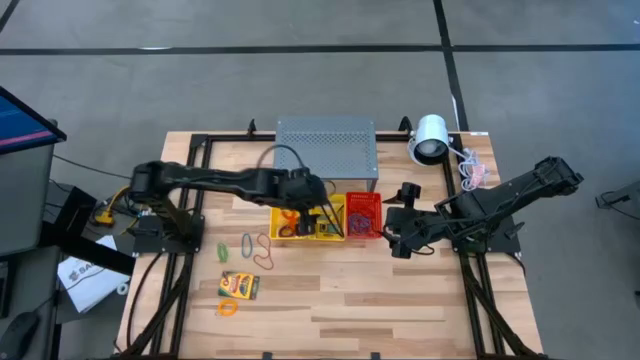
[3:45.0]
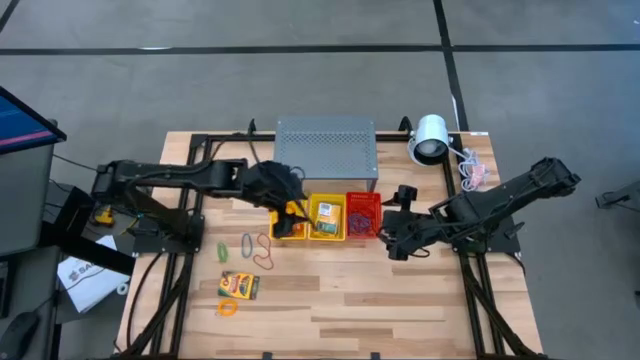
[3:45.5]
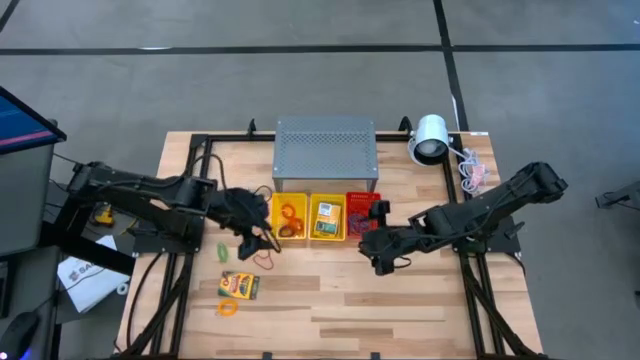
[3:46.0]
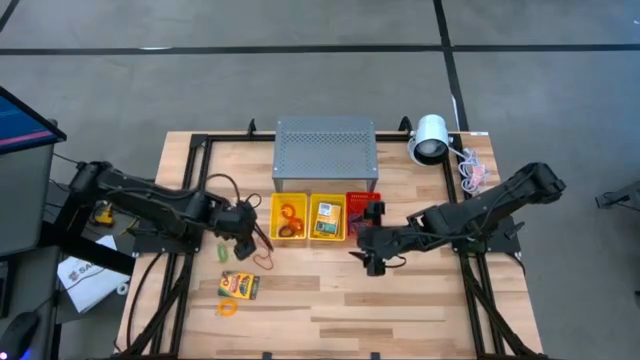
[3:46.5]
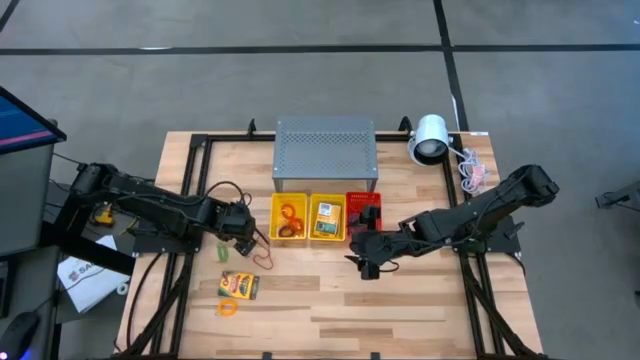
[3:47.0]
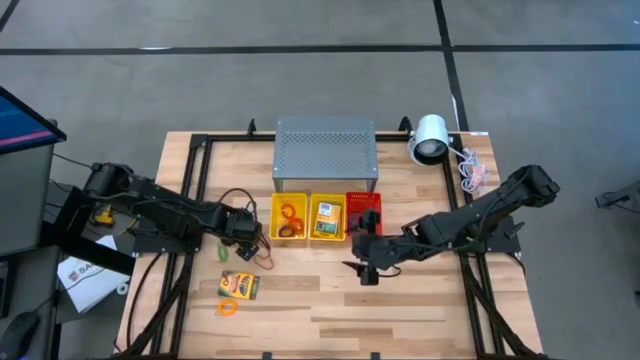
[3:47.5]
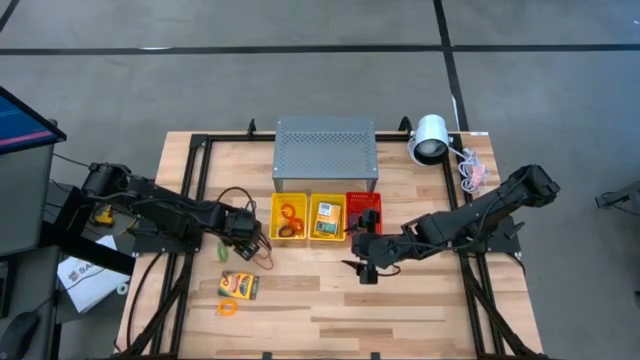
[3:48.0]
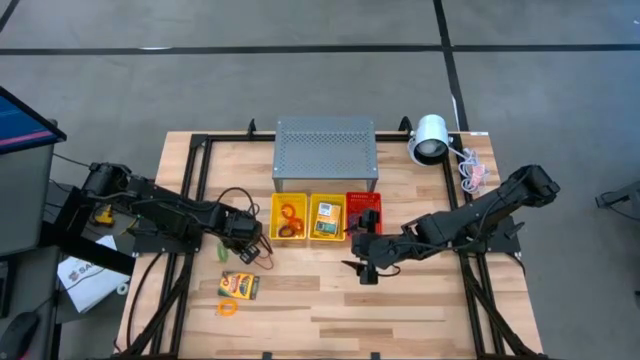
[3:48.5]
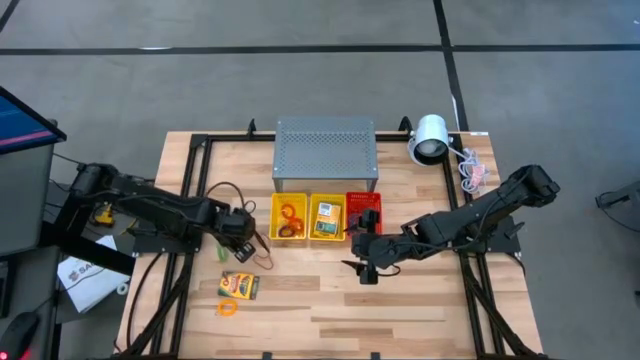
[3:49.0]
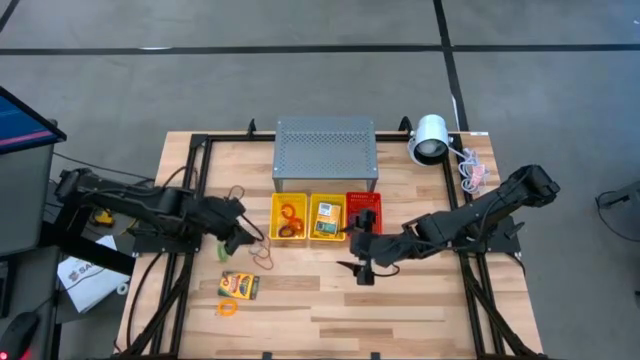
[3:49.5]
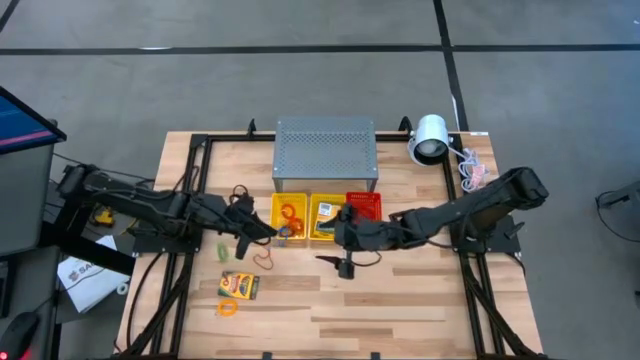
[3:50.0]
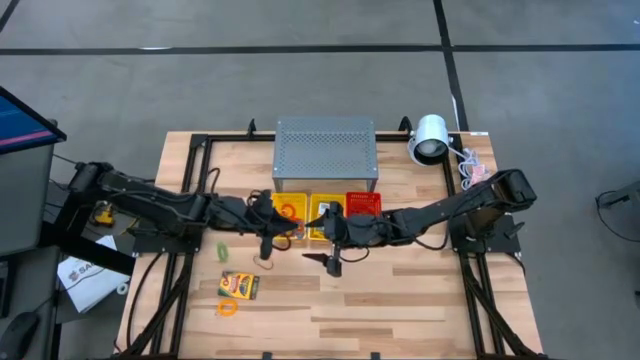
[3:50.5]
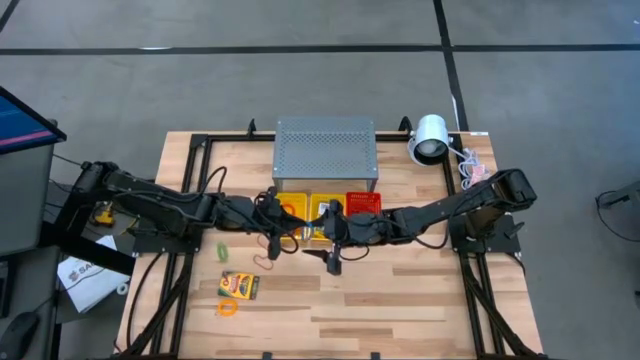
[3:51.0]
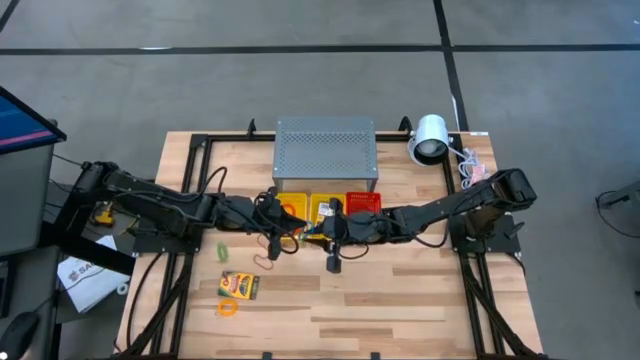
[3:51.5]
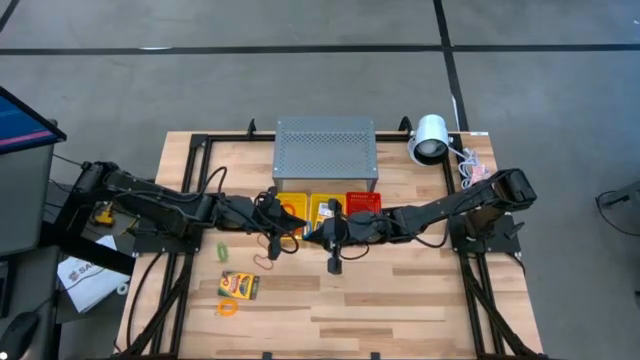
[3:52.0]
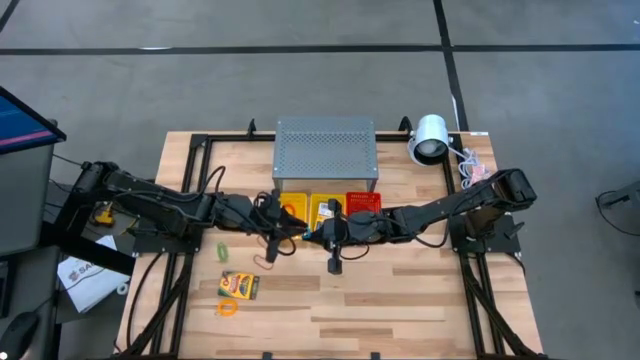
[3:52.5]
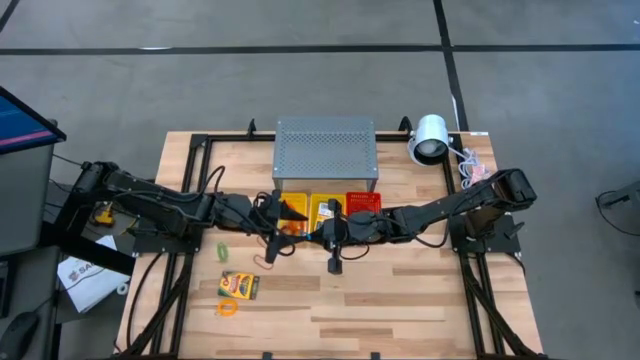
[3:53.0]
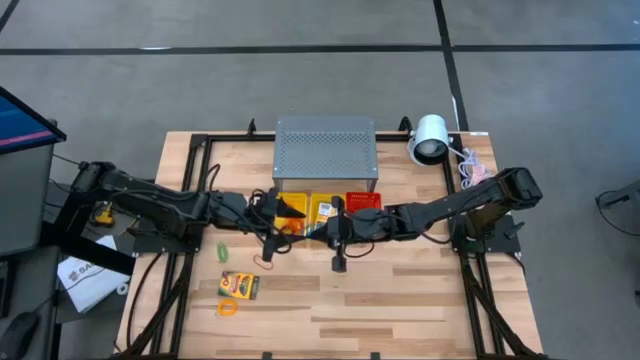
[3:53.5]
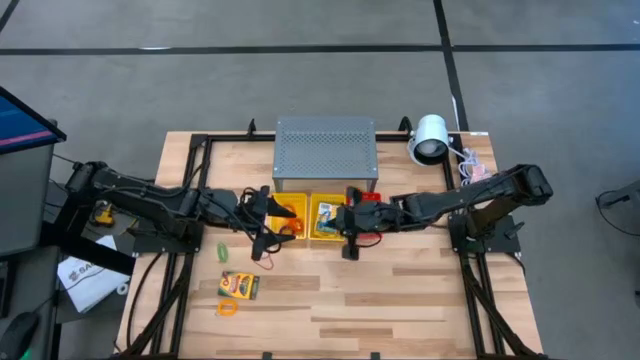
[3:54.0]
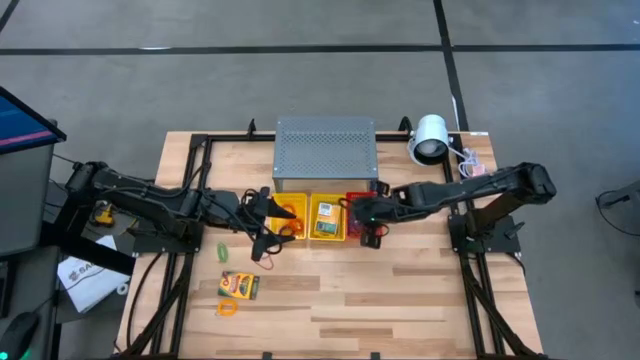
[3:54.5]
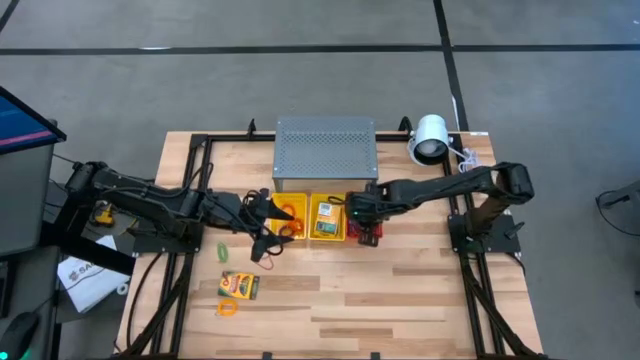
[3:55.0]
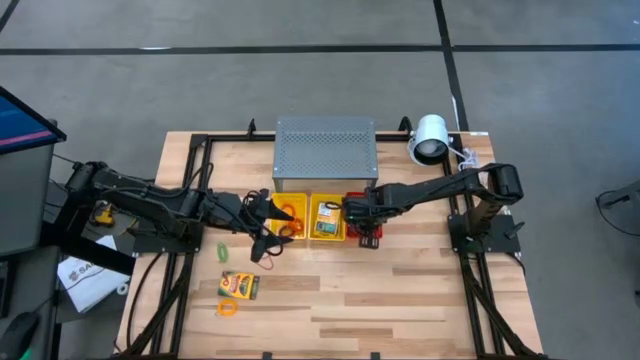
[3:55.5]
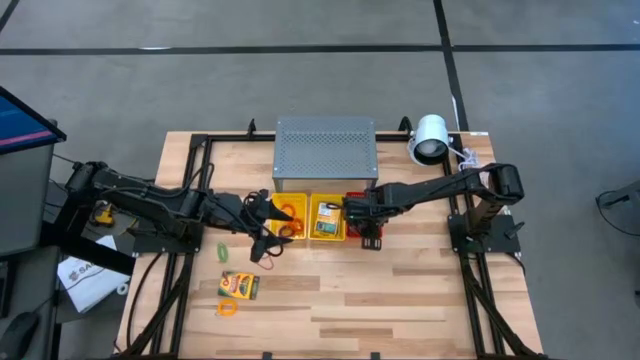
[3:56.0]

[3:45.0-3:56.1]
Task: Pick & Place Office Desk Supplies
Put the blue rubber band into the red bin

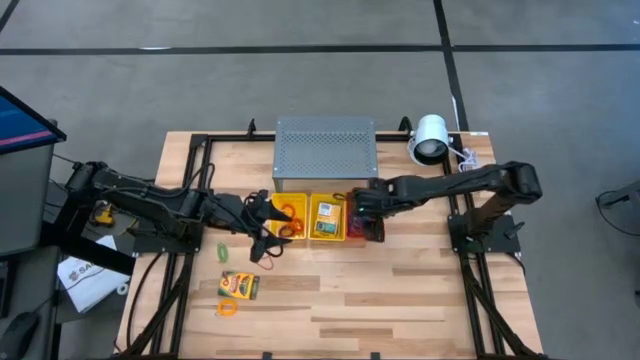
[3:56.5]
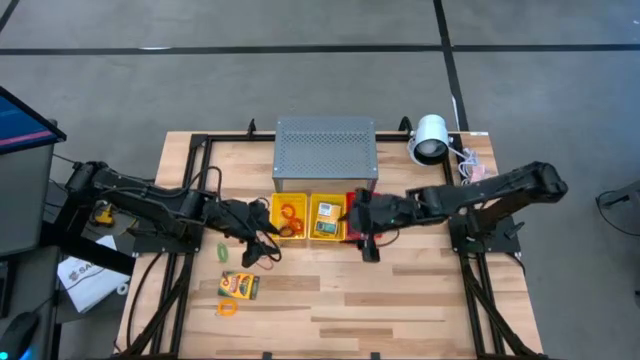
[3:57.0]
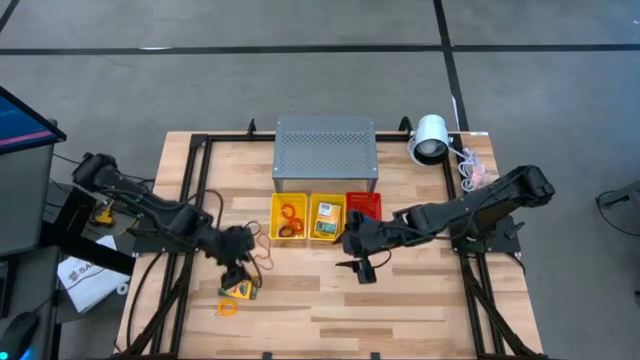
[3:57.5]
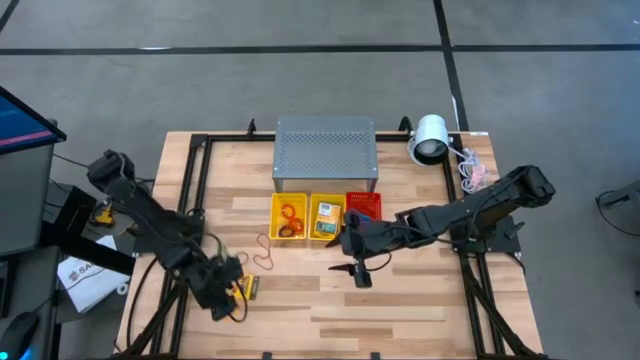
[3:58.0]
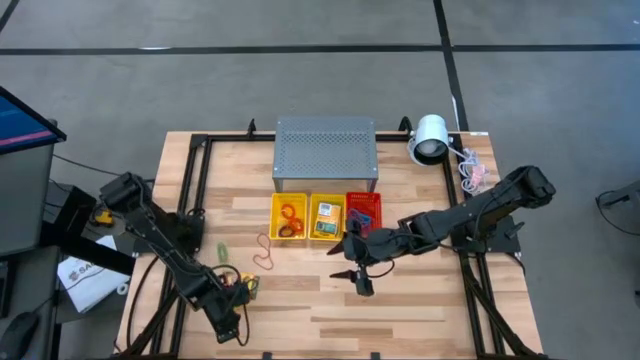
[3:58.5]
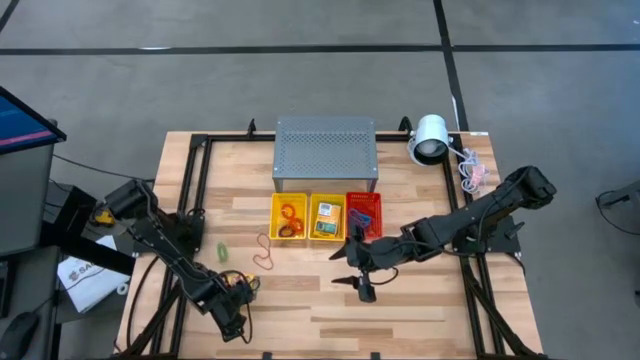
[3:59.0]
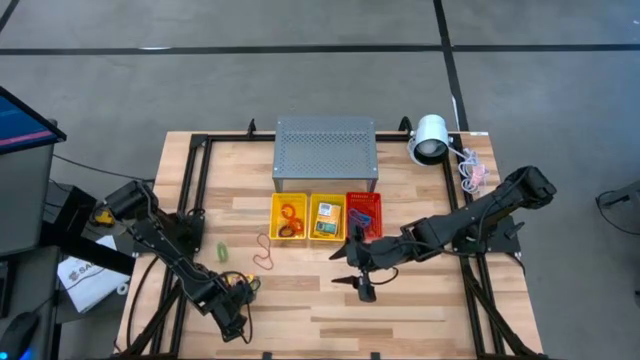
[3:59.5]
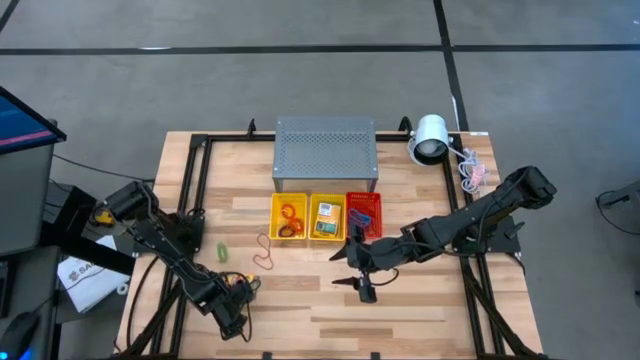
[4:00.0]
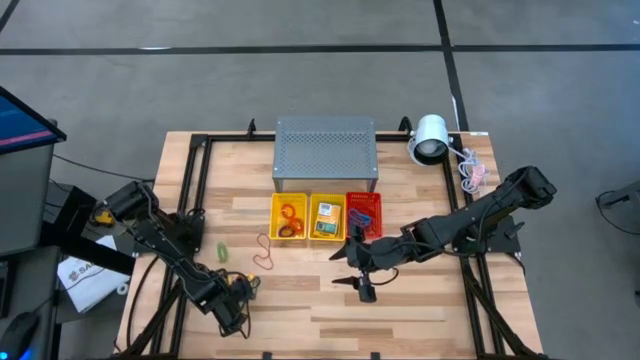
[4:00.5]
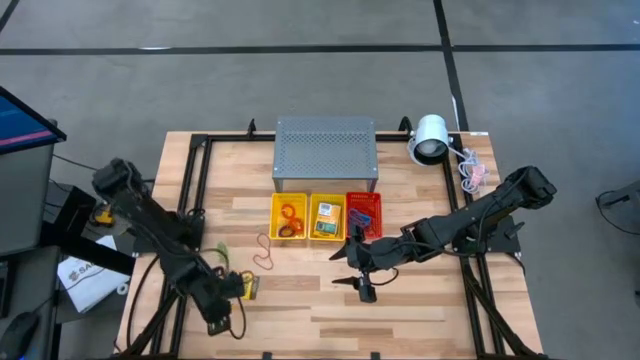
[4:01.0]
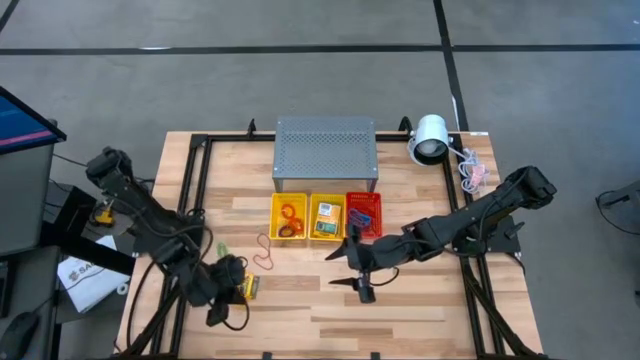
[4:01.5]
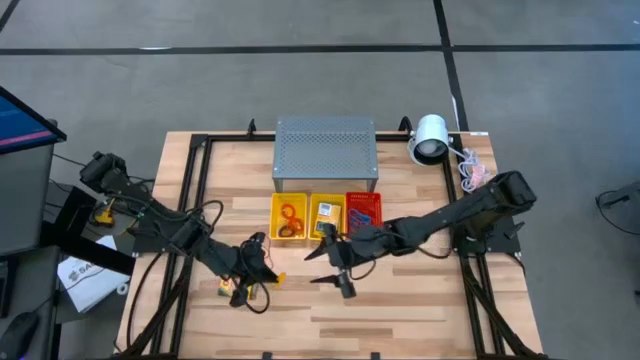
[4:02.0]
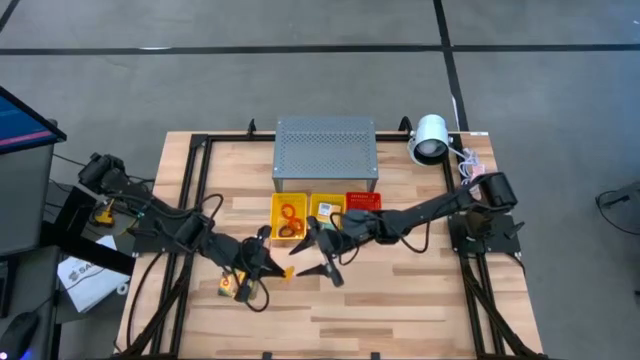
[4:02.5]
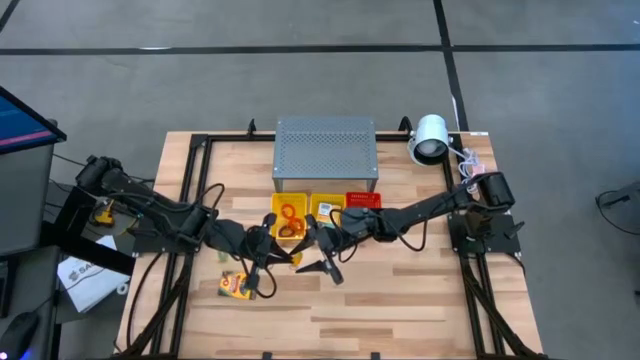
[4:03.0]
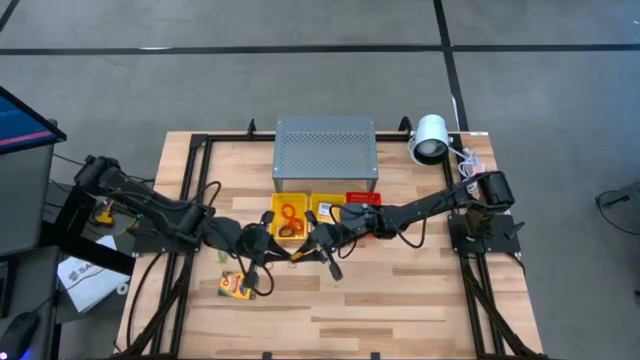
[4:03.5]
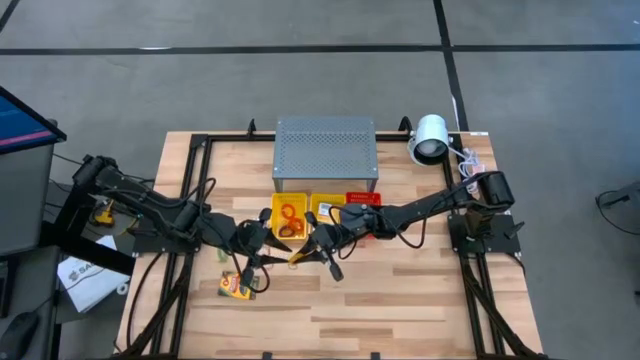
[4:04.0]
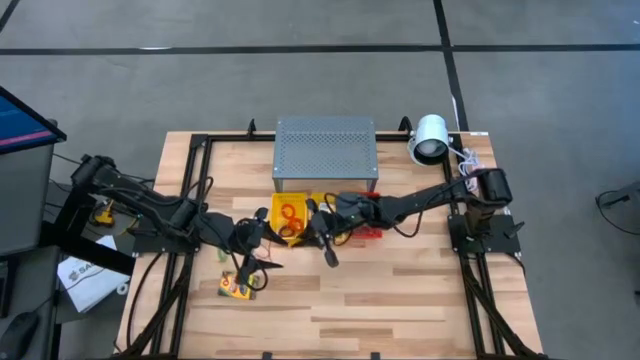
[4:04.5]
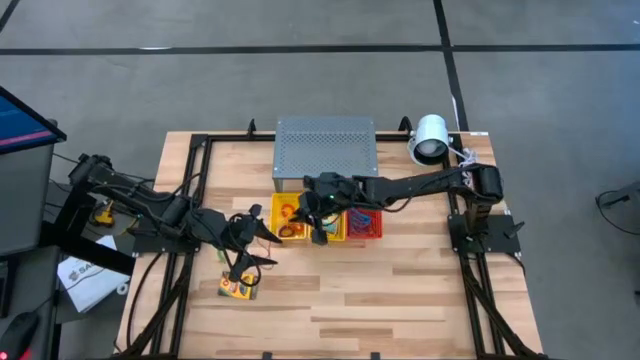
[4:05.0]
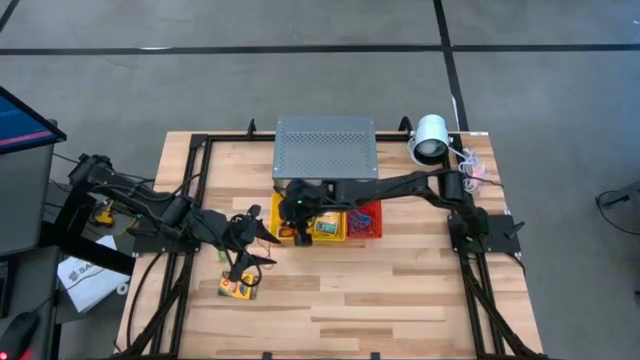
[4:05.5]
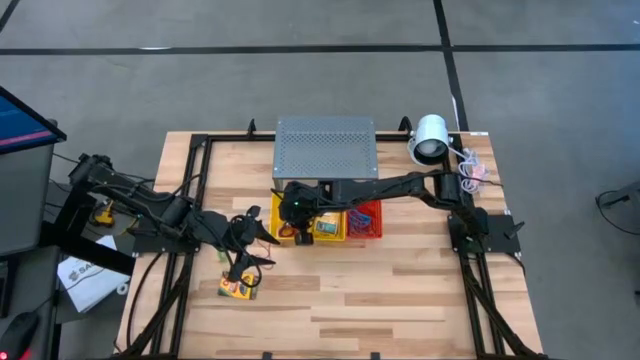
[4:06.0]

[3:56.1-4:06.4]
Put the yellow spring keychain into the left yellow bin
